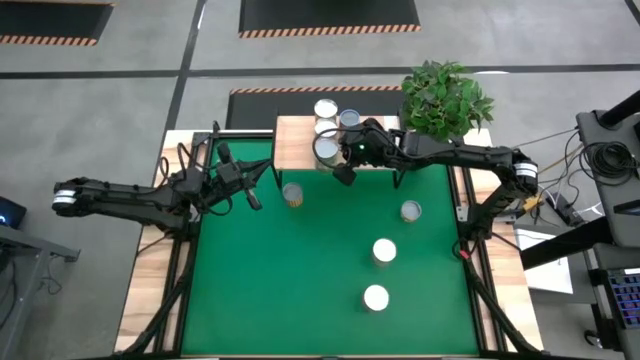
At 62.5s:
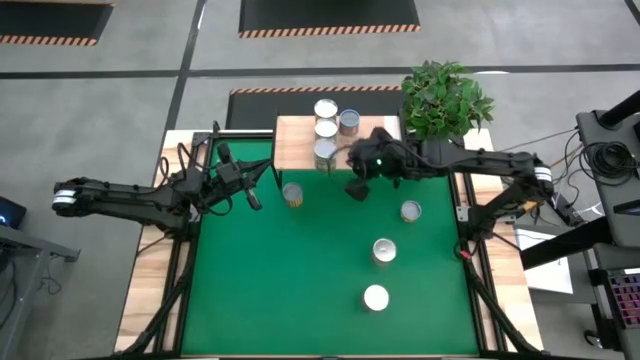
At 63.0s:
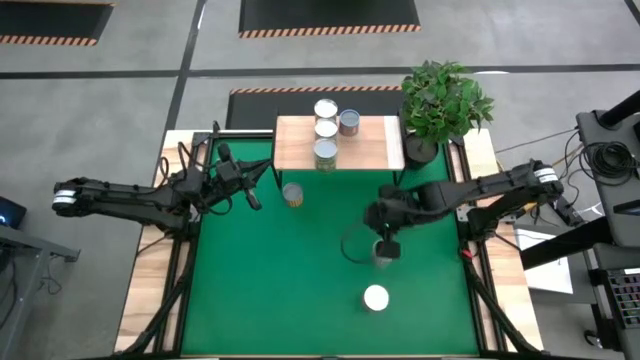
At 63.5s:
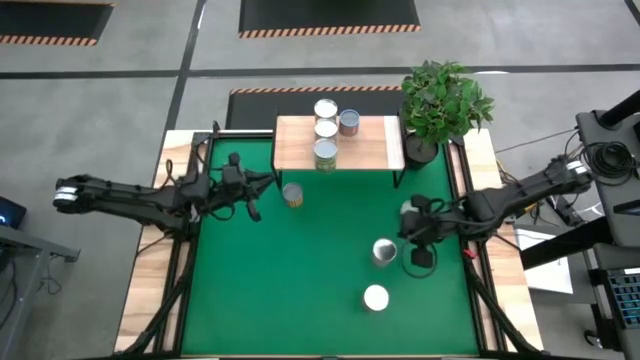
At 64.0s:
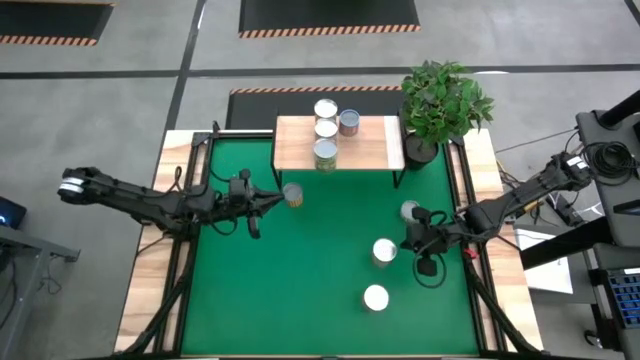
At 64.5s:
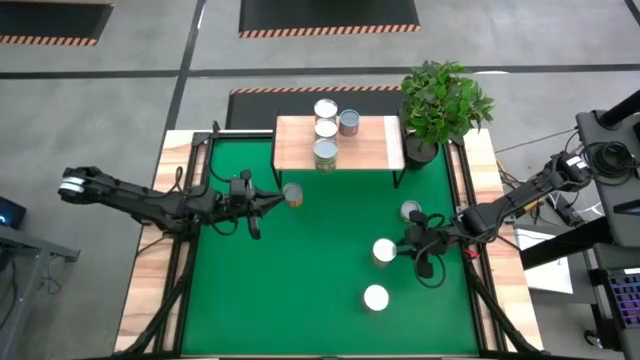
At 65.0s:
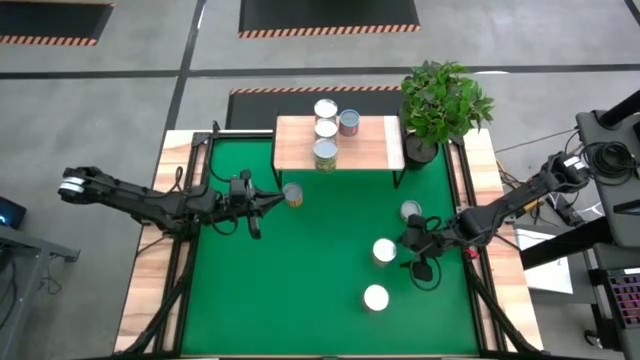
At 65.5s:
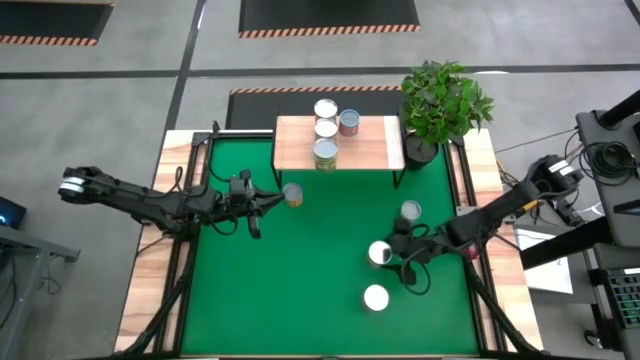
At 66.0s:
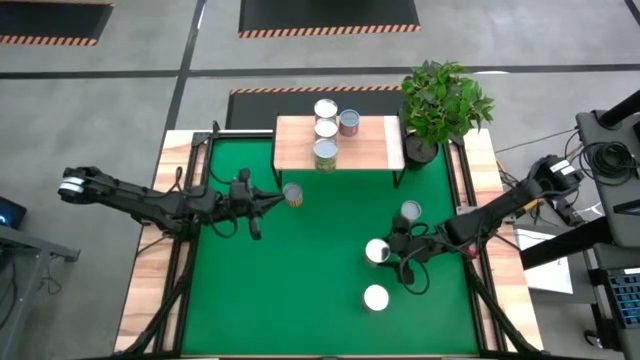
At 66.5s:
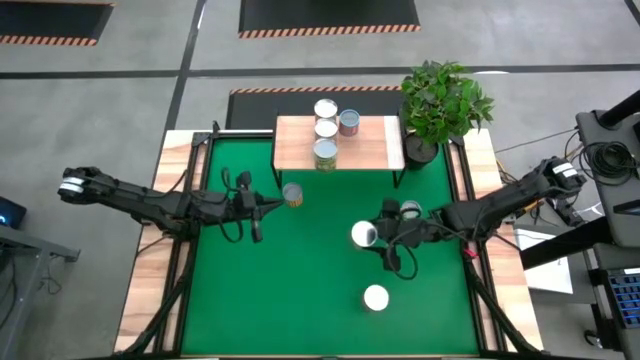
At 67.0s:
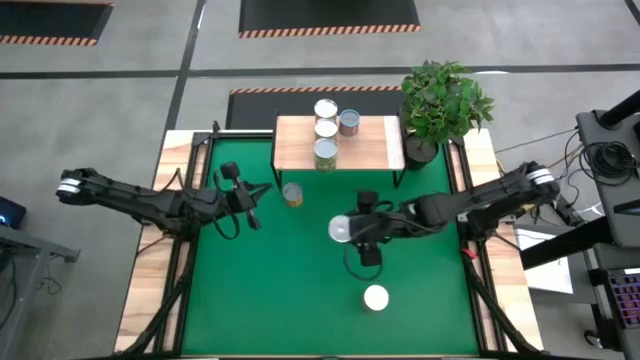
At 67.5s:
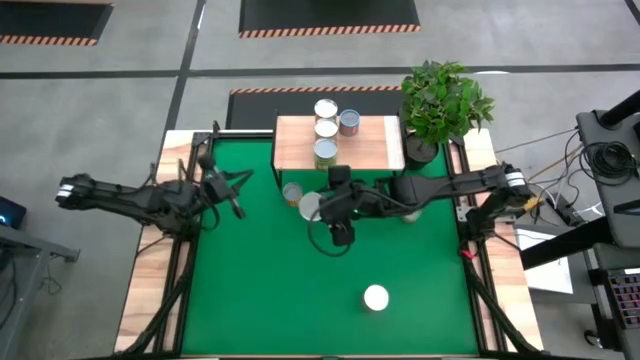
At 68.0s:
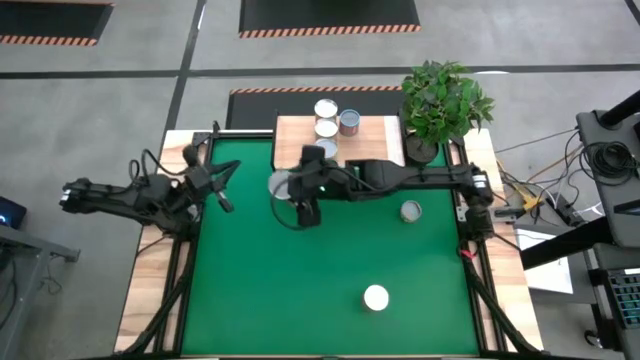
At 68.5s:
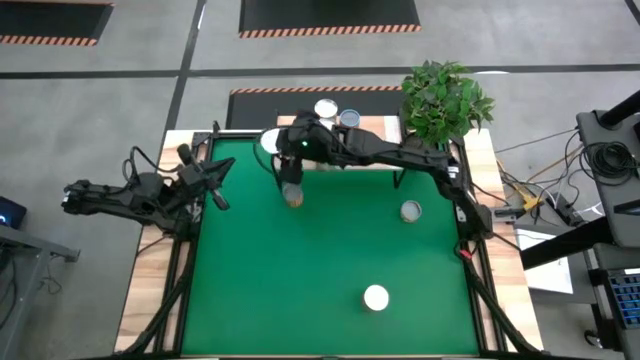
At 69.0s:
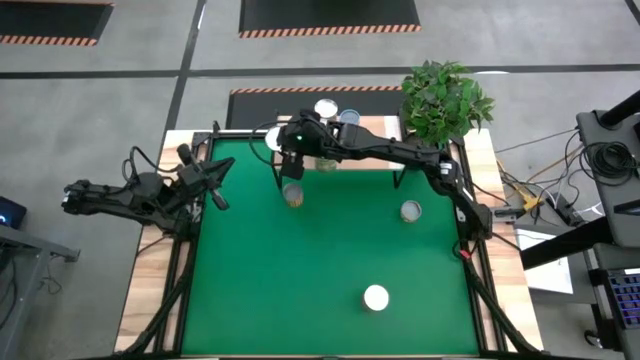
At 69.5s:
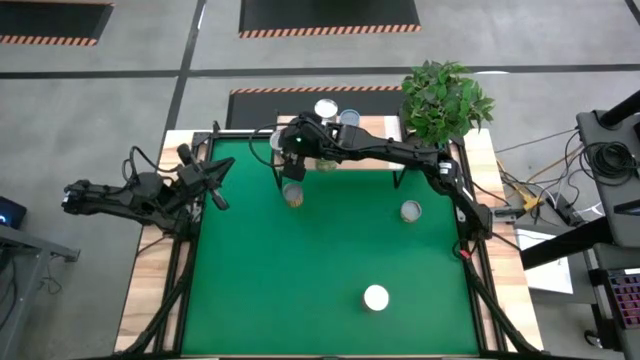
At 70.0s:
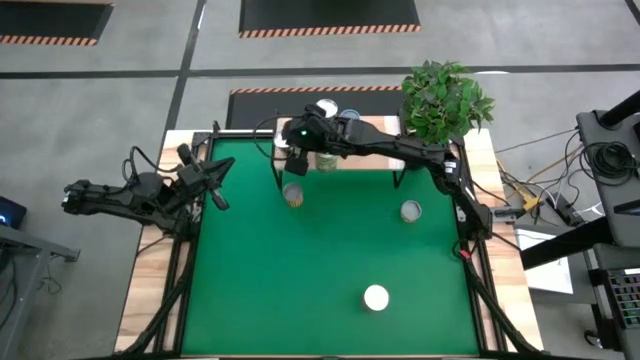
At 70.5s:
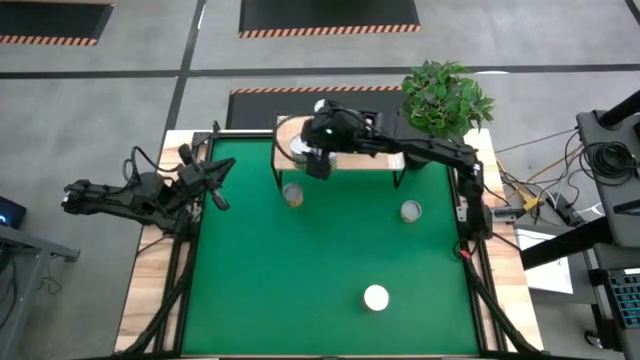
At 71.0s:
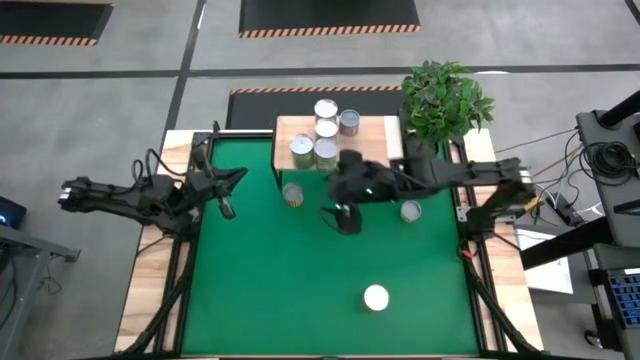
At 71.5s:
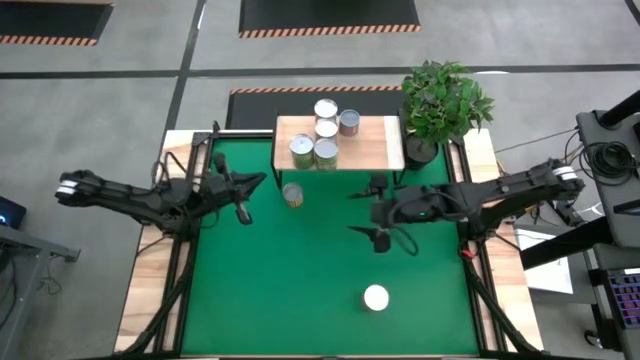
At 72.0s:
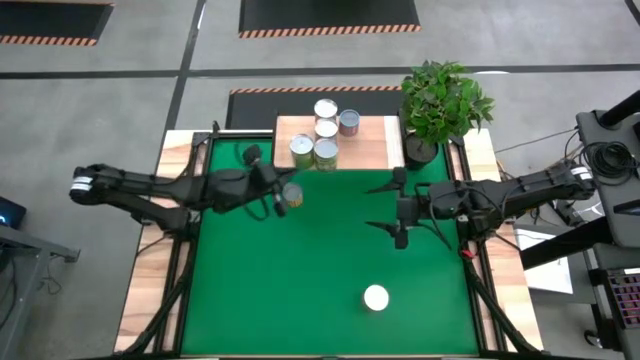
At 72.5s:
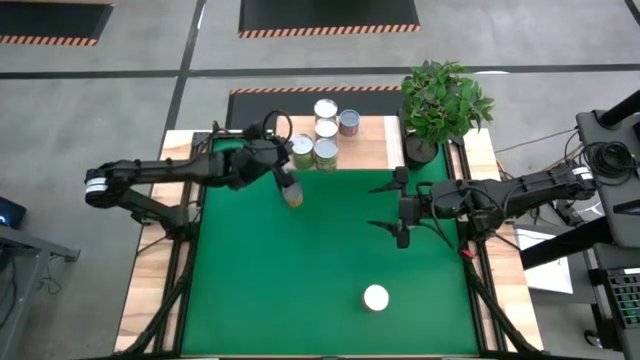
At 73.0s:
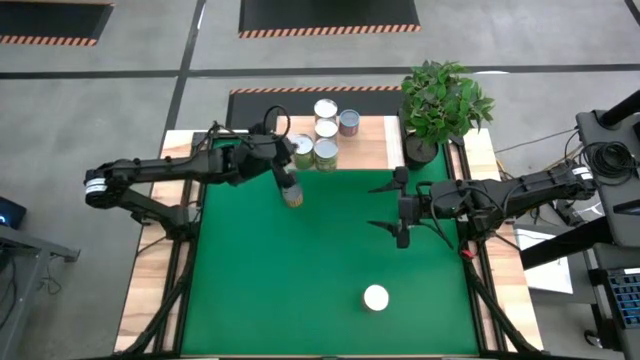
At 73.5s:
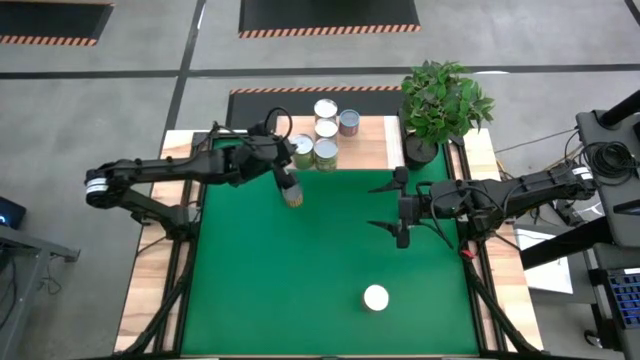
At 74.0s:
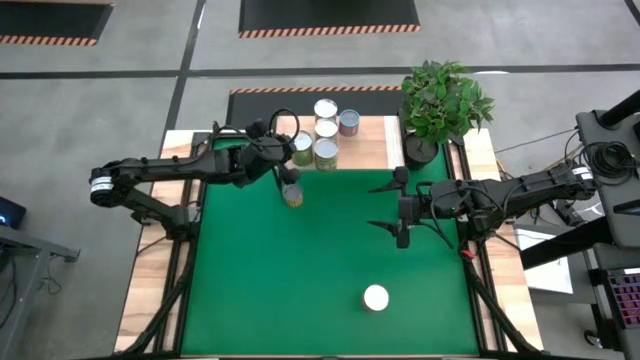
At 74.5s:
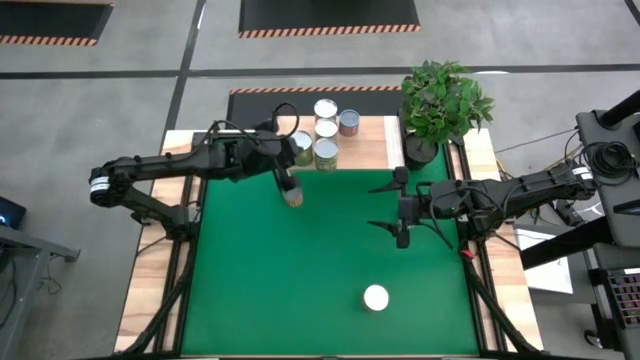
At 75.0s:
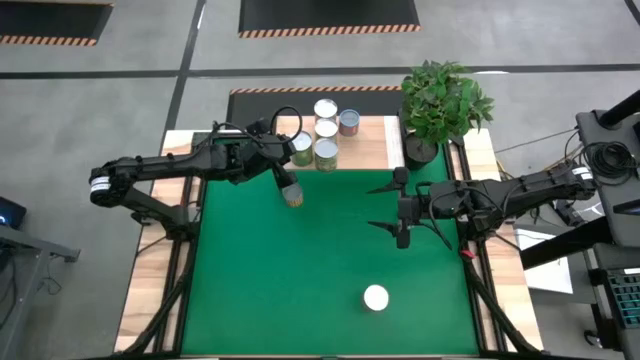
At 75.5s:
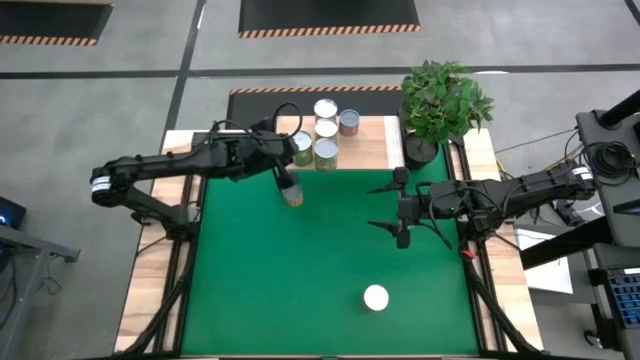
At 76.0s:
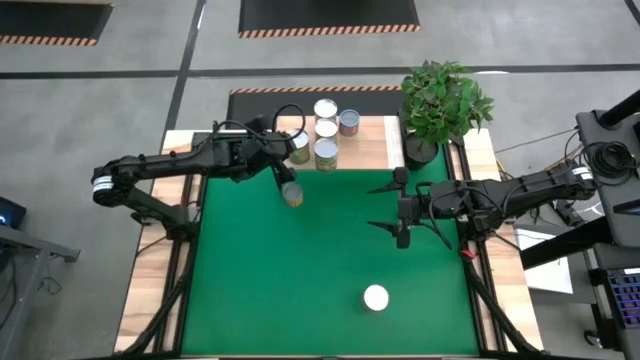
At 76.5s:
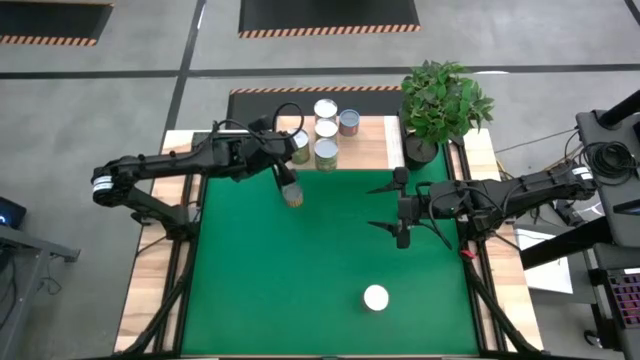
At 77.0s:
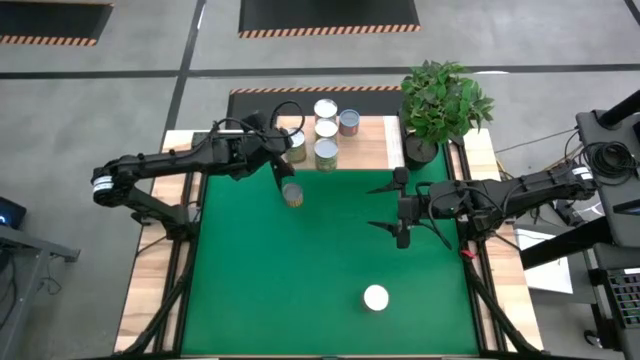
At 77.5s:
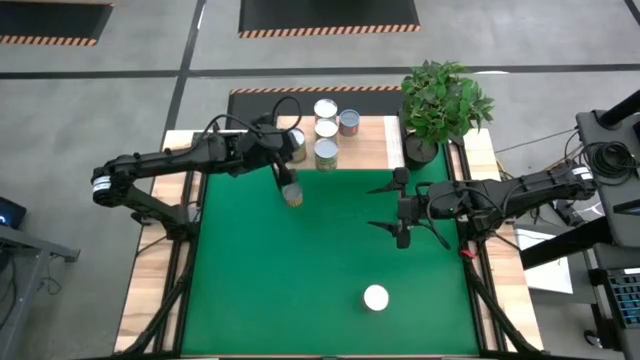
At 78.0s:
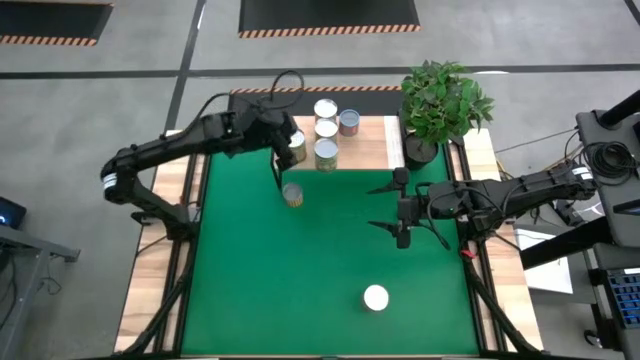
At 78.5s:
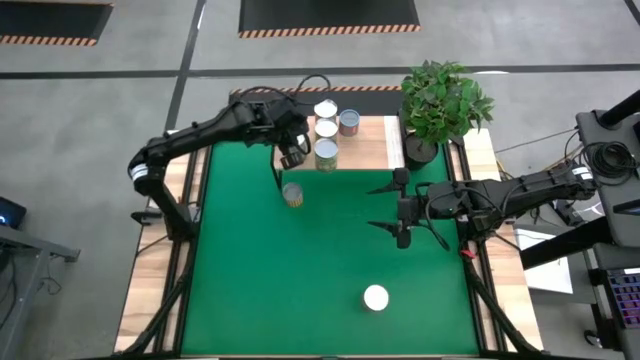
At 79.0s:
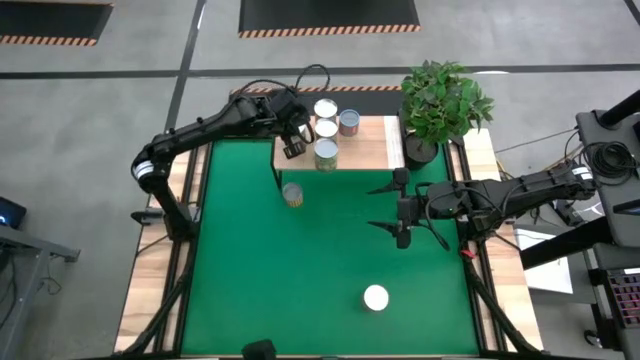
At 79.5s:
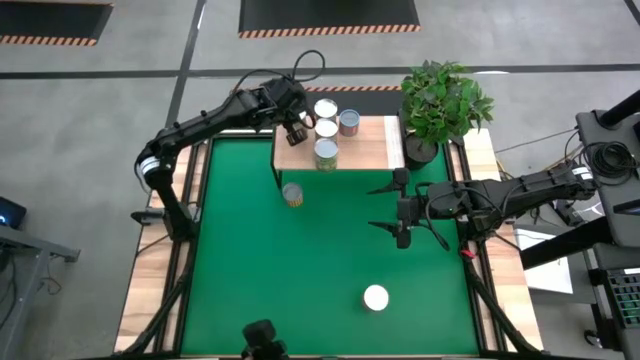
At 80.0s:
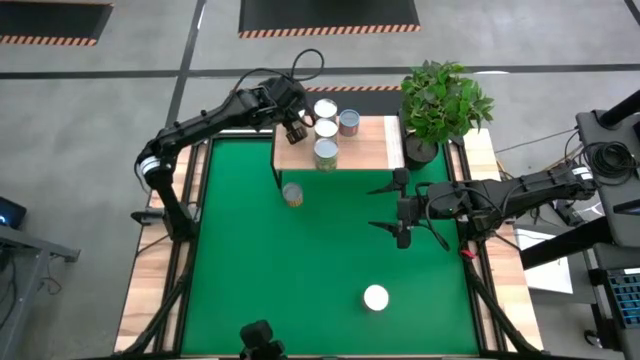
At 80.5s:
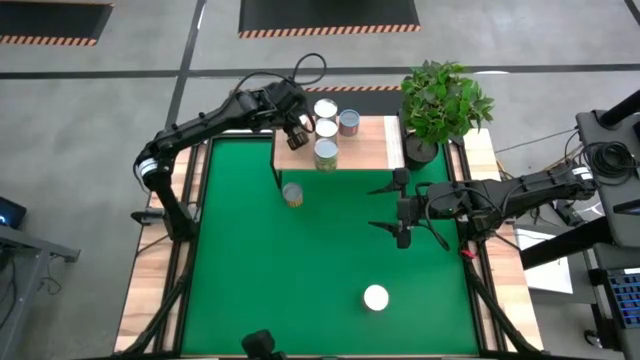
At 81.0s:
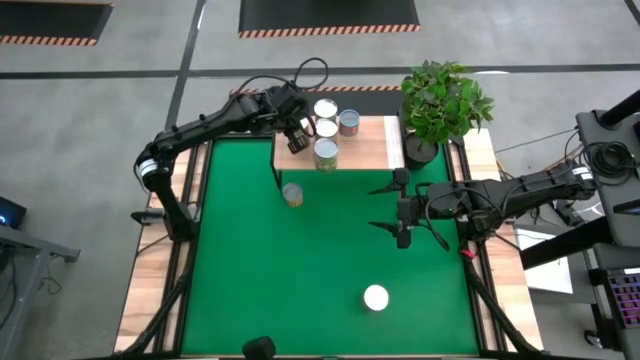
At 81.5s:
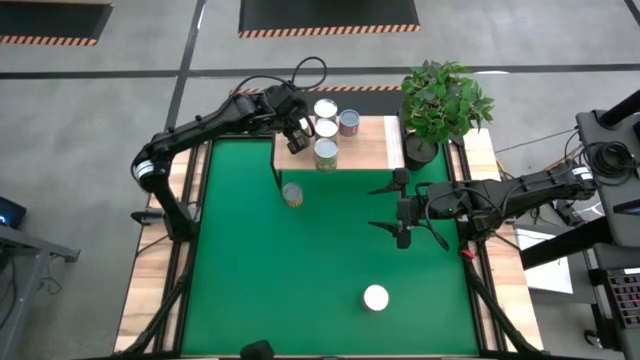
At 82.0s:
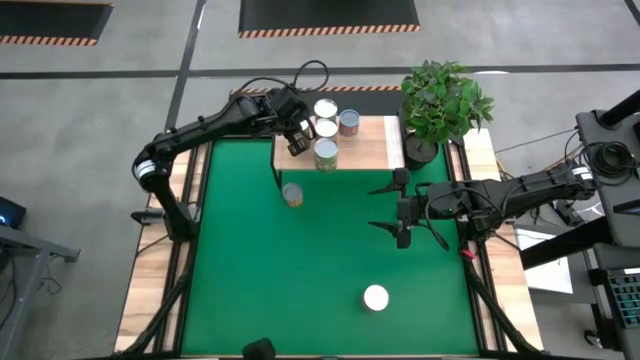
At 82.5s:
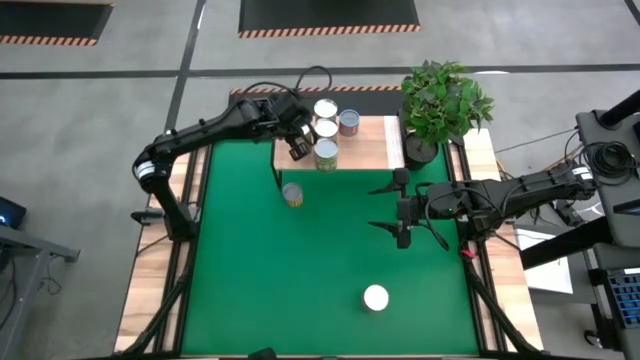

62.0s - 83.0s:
Task: Pick and place cans onto a shelf
Put the canned oranges on the shelf
